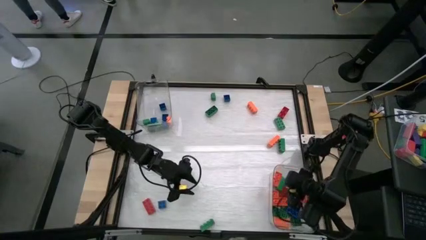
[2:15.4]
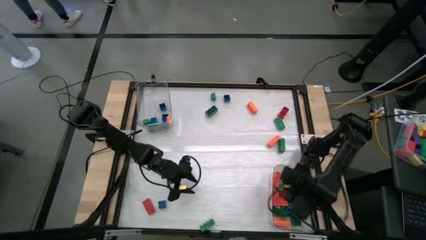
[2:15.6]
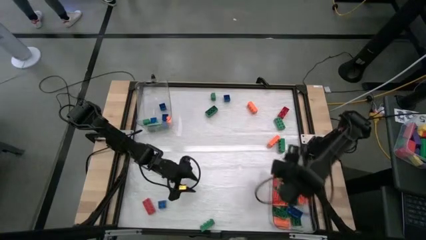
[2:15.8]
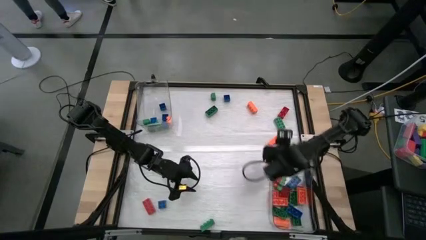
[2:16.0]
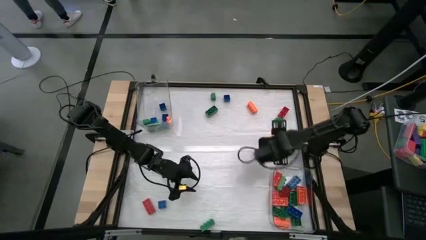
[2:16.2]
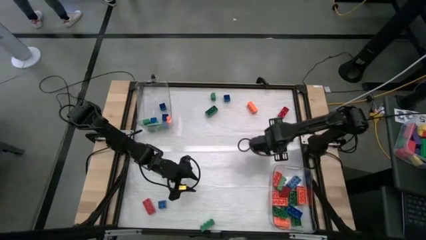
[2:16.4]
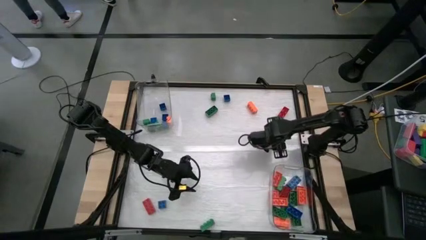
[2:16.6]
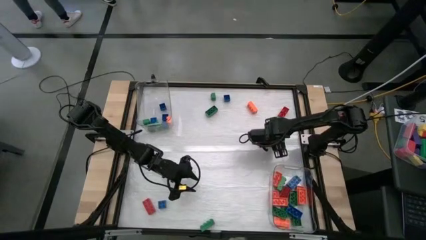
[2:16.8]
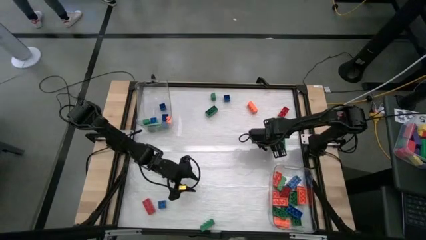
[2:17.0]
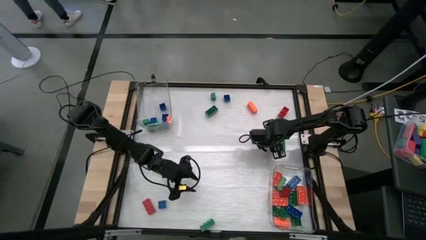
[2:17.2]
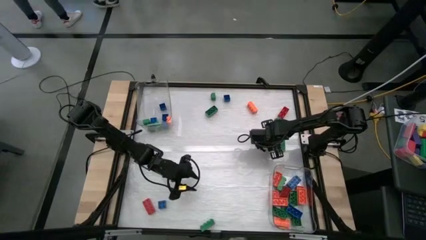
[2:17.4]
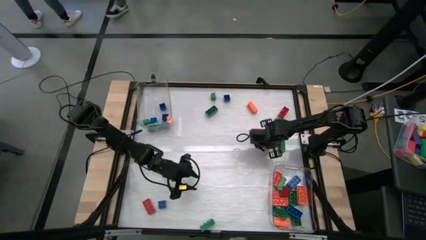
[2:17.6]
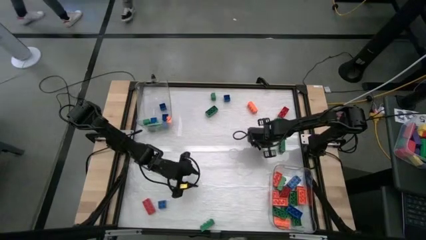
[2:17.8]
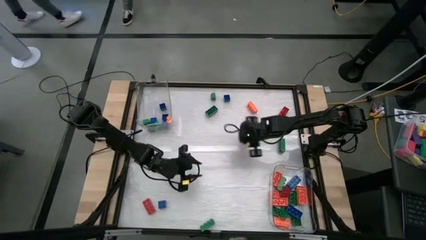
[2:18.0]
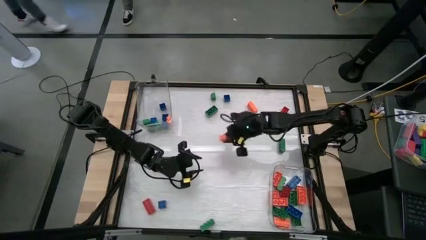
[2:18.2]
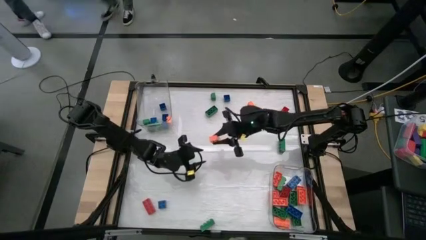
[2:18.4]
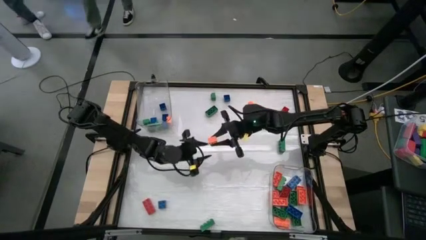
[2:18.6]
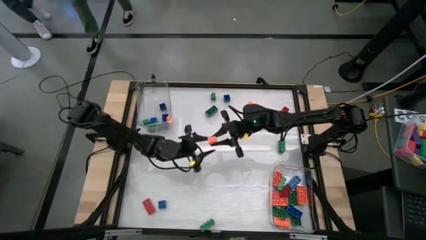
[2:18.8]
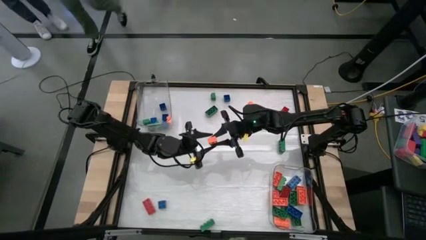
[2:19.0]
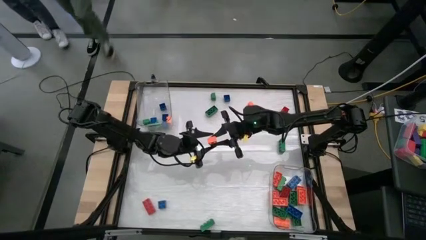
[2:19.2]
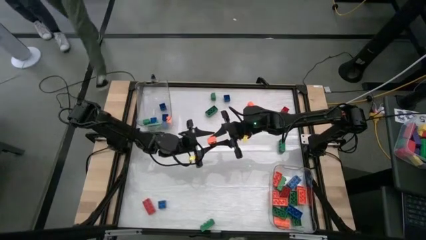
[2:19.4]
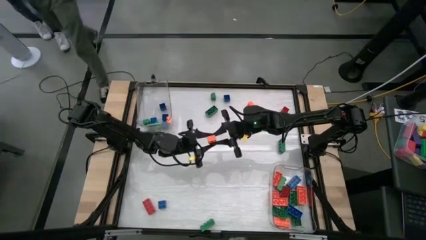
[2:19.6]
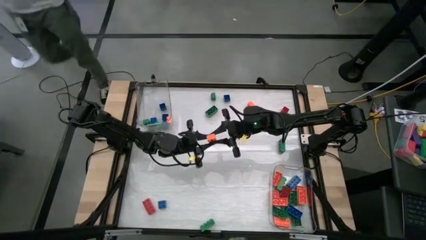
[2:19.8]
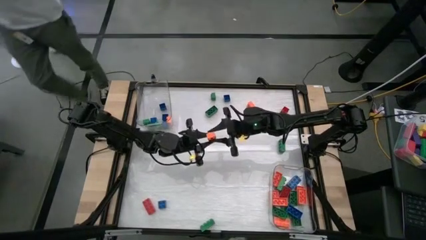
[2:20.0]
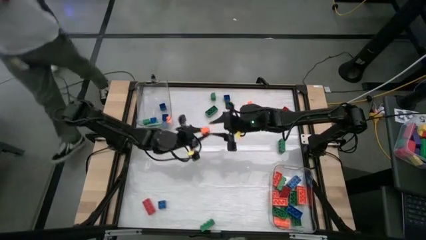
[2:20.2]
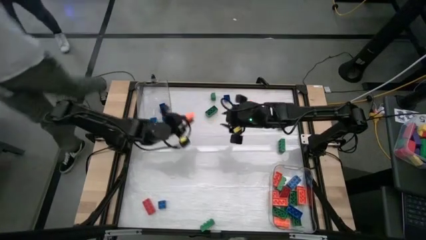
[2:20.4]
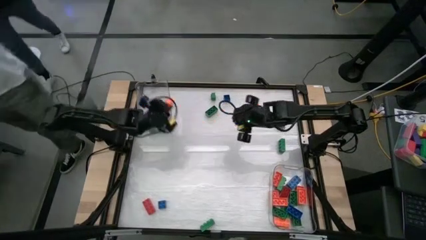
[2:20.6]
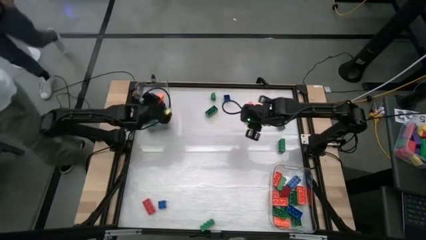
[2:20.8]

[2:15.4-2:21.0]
Task: Sort blocks by size
Put the 8 stud orange game piece into the bottom transparent bin

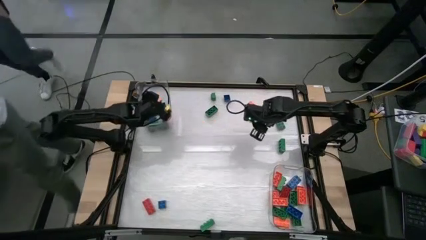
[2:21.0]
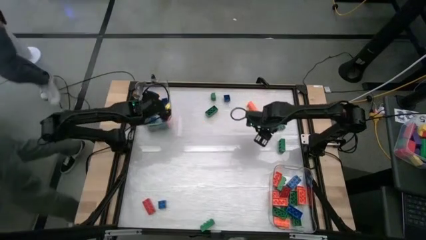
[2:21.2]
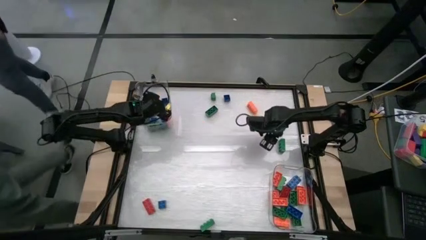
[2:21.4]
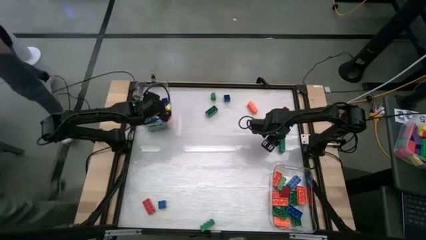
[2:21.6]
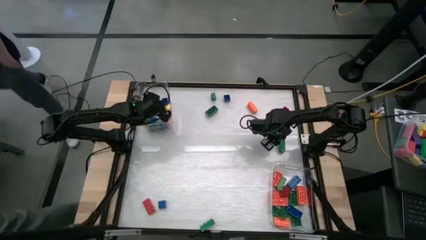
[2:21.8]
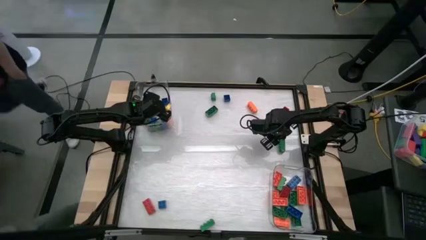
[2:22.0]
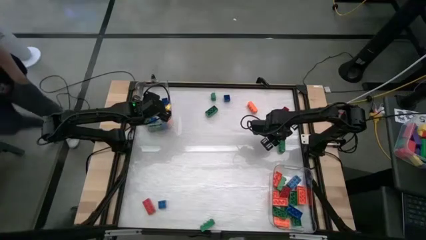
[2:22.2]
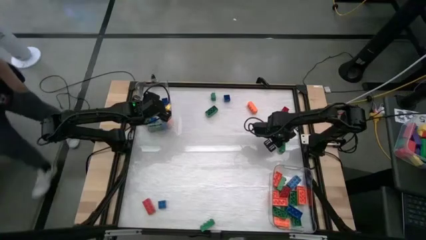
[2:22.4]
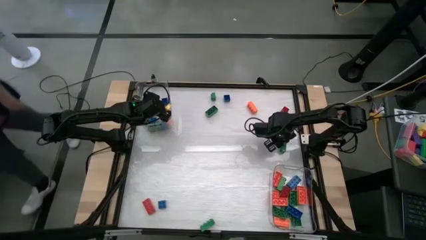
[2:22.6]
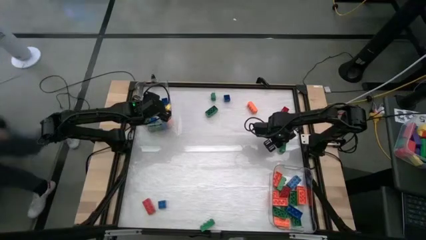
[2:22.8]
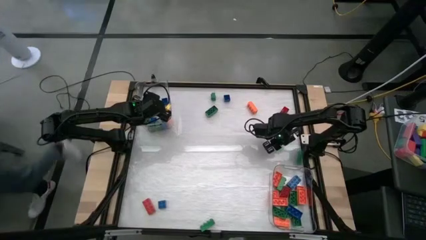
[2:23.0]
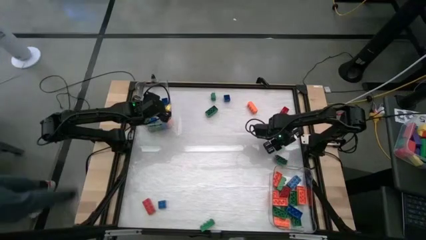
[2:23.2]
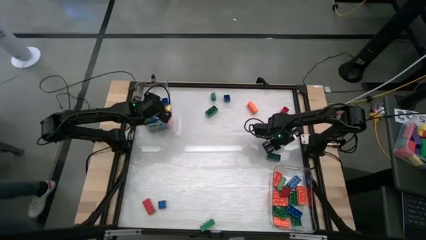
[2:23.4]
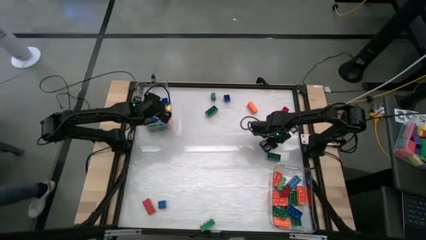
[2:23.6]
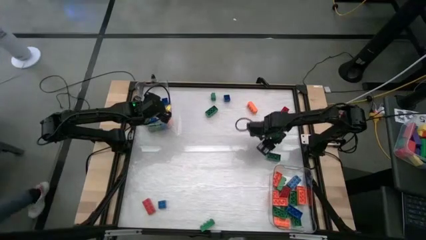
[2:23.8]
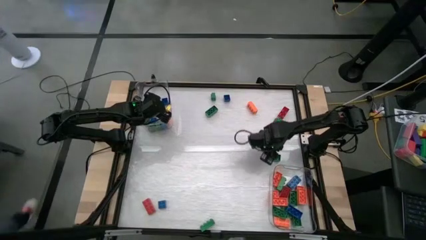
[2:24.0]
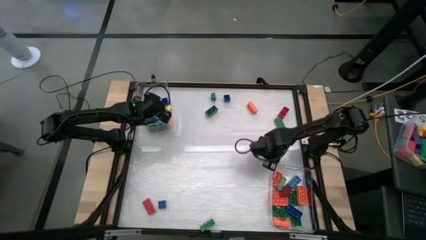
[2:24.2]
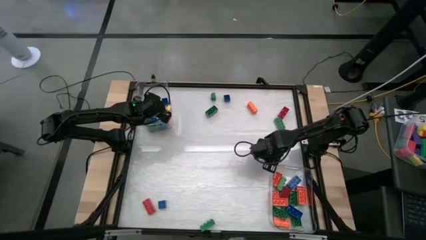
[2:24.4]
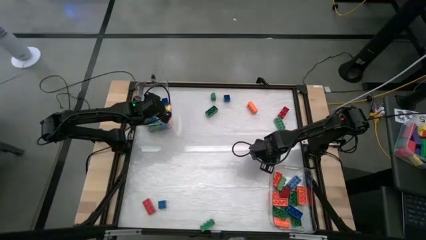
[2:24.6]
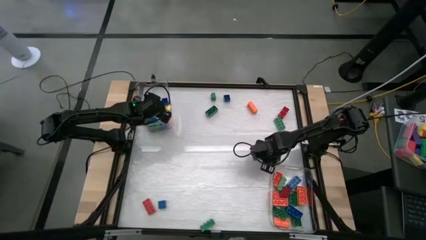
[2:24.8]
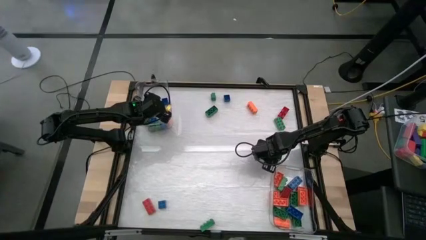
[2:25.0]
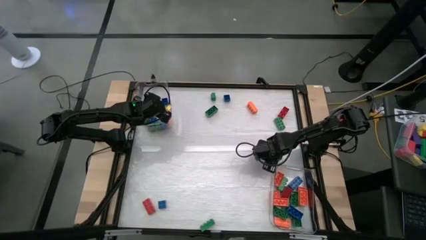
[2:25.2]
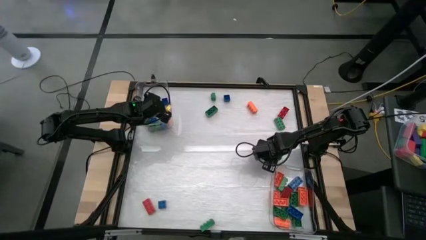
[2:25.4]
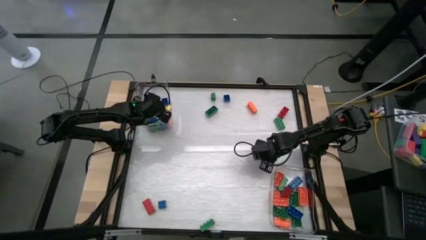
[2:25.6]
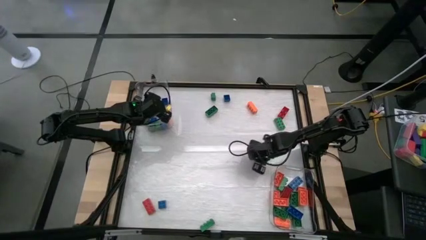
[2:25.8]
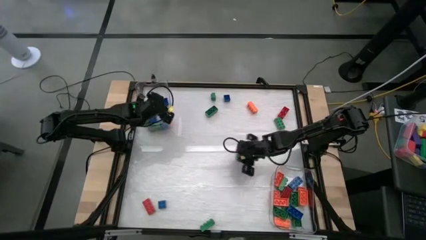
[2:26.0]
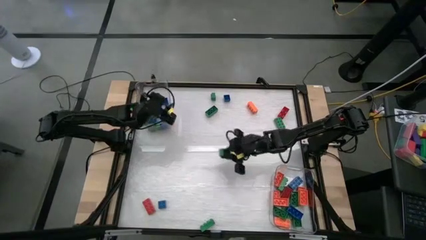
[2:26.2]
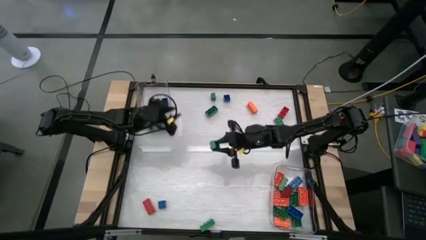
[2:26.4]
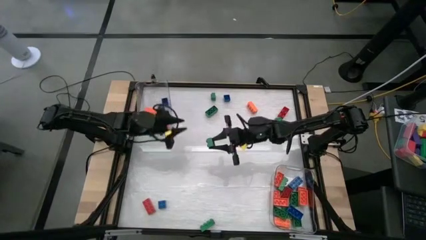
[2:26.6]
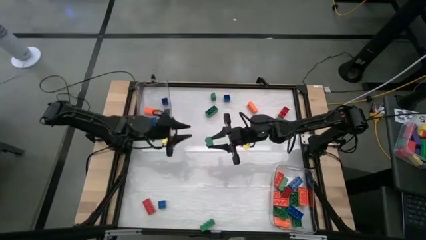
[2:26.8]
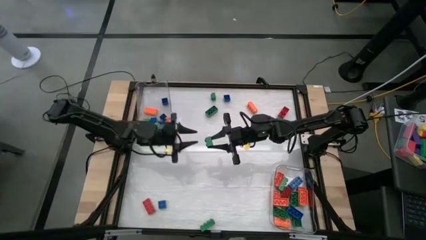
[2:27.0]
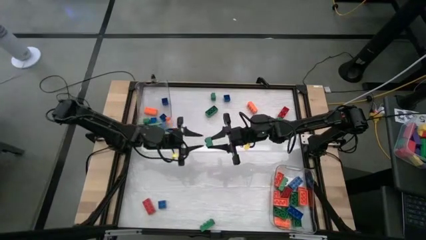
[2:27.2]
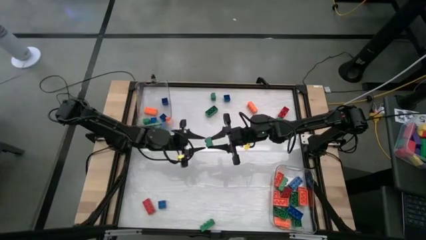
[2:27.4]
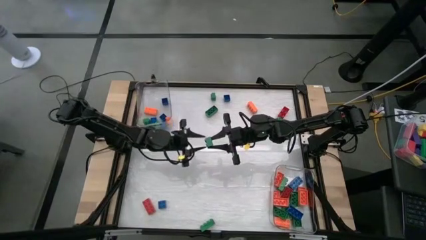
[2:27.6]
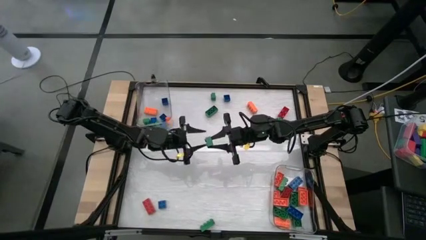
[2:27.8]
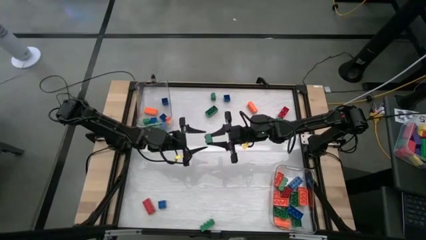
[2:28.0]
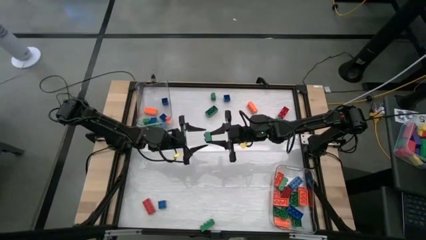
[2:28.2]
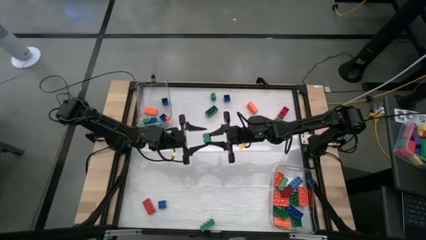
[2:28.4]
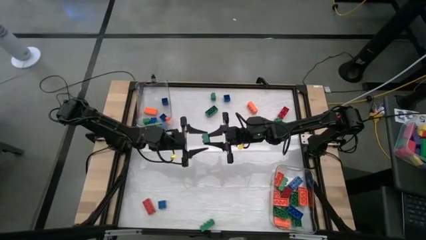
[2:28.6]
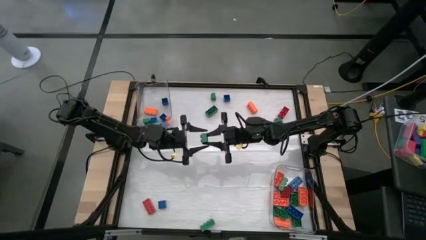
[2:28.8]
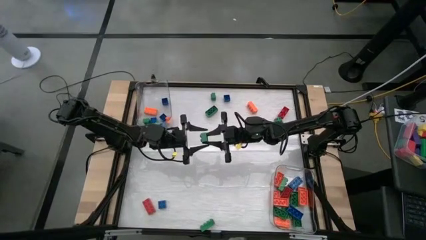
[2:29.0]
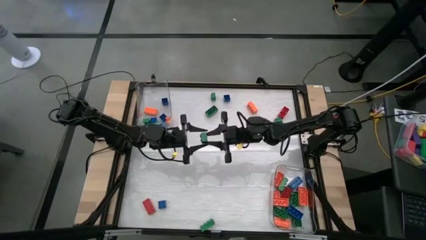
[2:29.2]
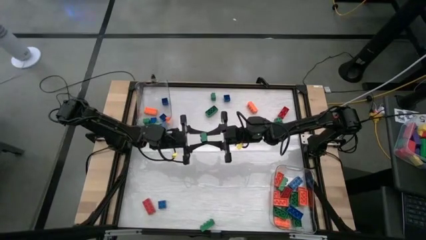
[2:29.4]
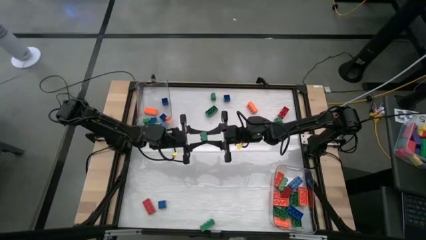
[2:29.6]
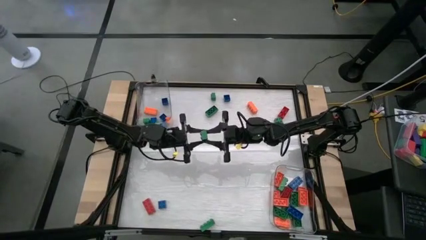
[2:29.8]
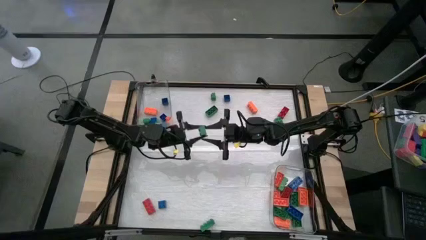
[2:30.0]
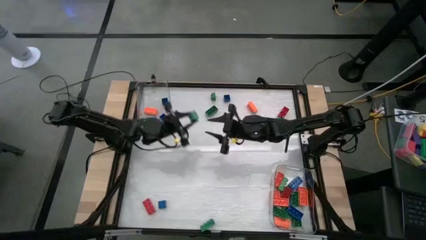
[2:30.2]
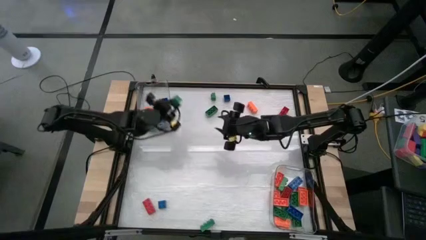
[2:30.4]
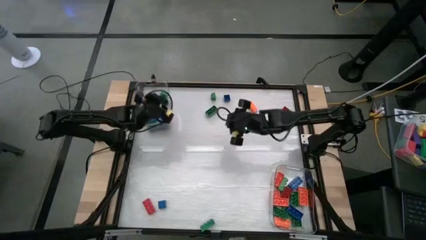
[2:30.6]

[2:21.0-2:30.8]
Put the 8 stud green game piece into the bottom transparent bin
